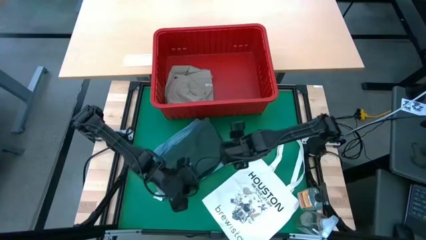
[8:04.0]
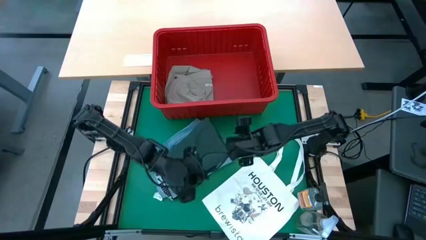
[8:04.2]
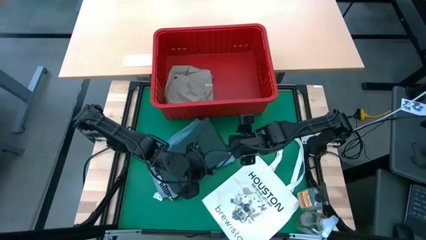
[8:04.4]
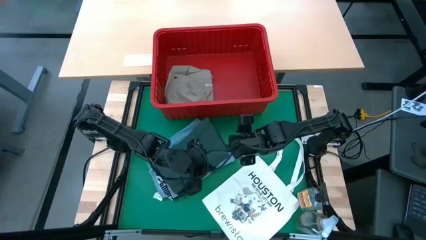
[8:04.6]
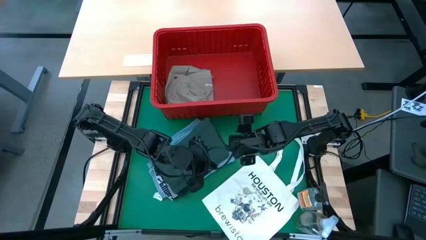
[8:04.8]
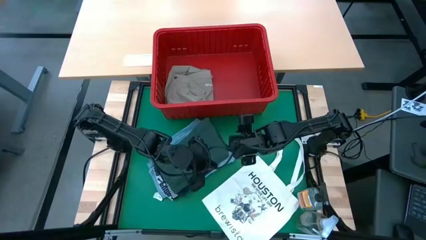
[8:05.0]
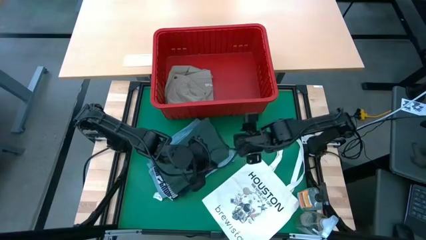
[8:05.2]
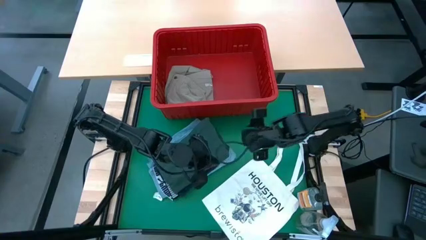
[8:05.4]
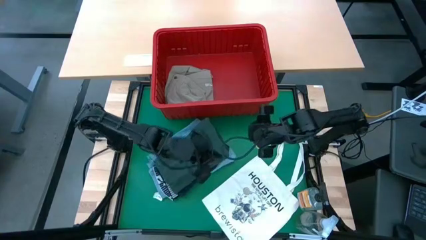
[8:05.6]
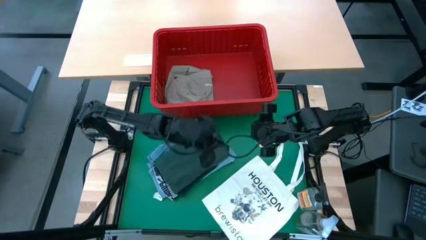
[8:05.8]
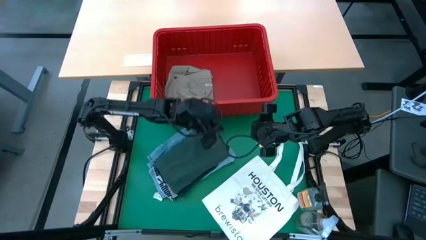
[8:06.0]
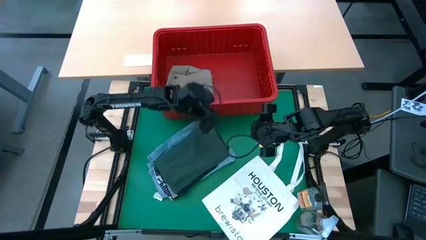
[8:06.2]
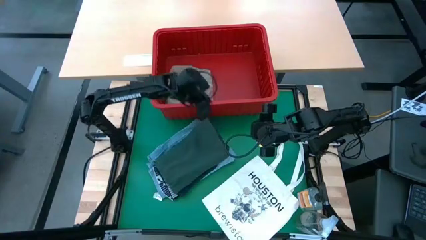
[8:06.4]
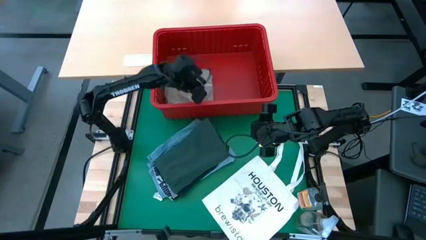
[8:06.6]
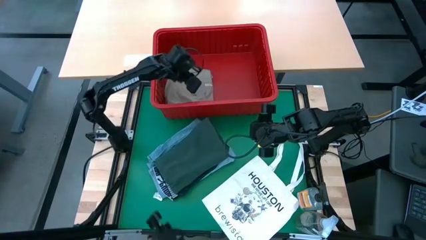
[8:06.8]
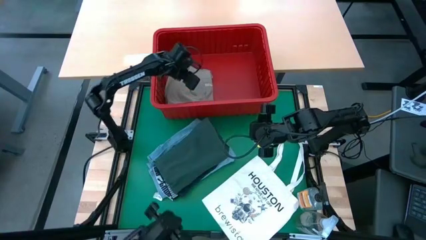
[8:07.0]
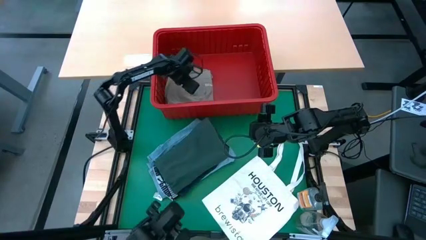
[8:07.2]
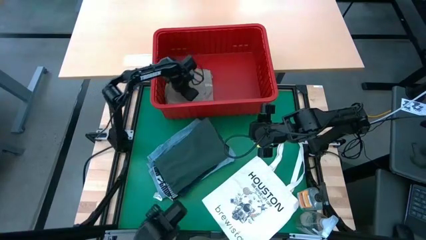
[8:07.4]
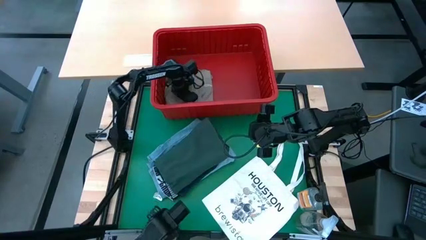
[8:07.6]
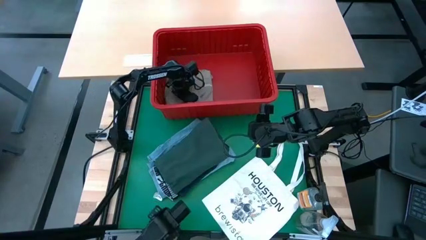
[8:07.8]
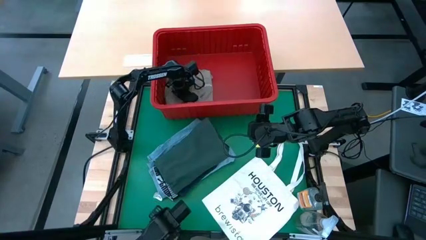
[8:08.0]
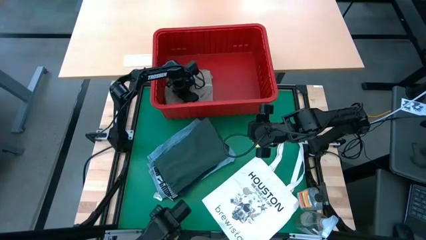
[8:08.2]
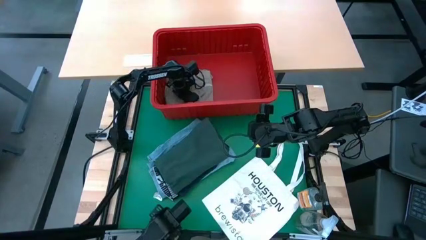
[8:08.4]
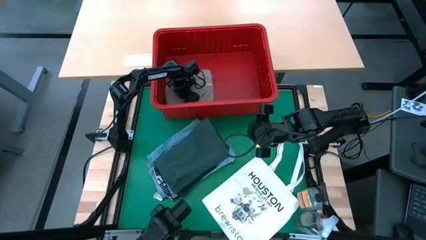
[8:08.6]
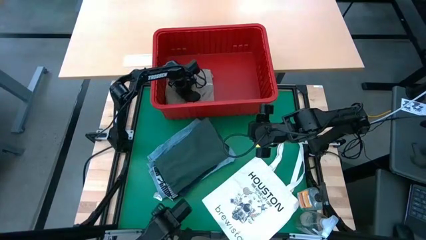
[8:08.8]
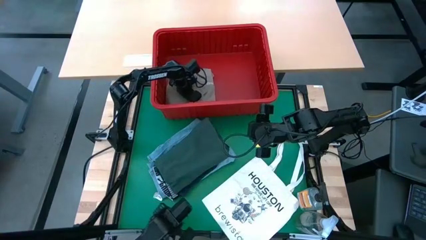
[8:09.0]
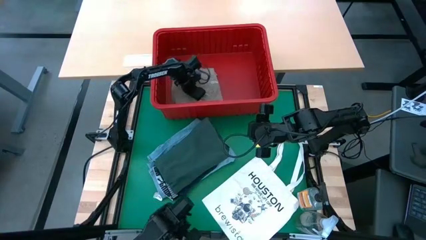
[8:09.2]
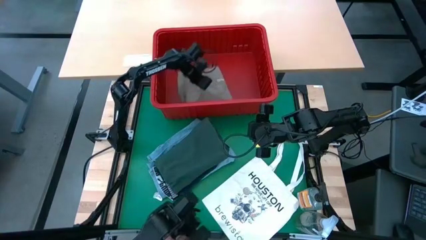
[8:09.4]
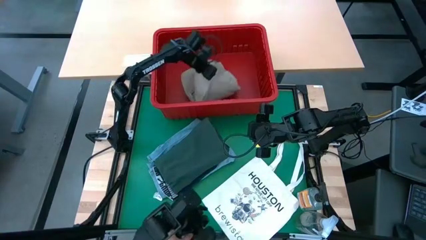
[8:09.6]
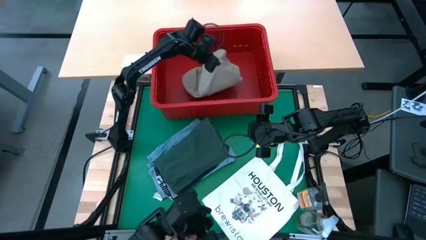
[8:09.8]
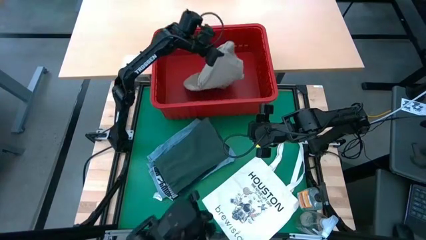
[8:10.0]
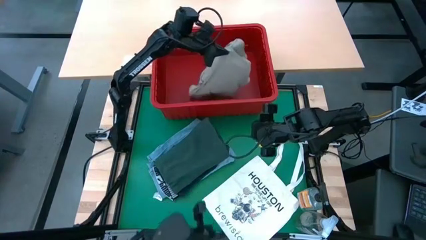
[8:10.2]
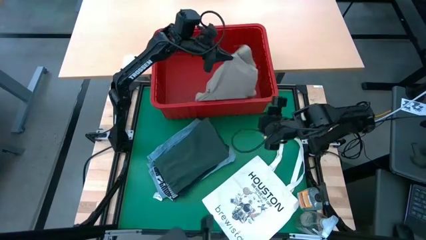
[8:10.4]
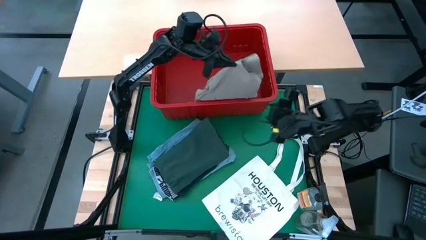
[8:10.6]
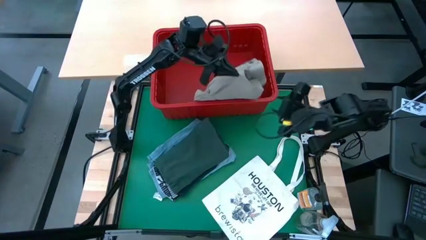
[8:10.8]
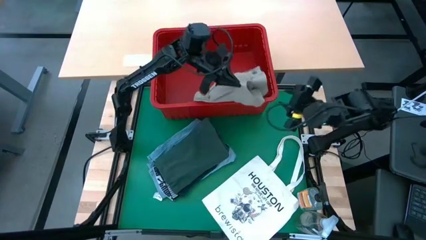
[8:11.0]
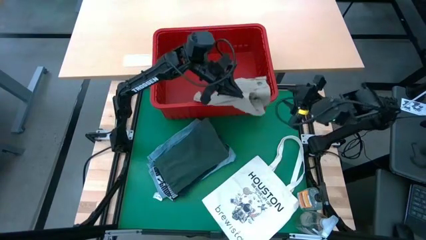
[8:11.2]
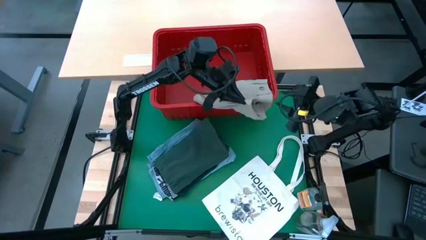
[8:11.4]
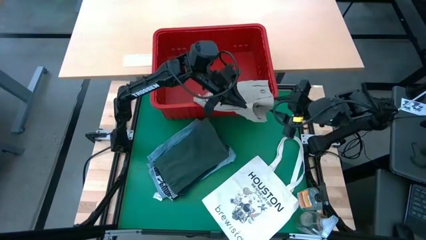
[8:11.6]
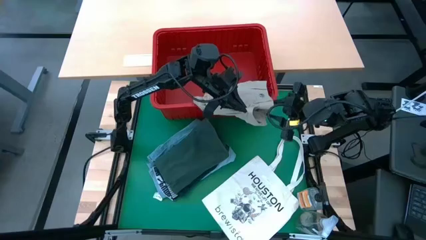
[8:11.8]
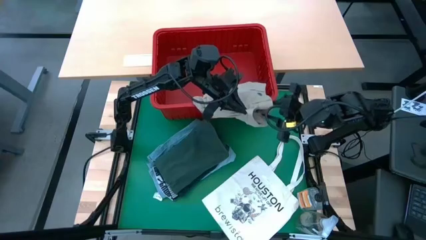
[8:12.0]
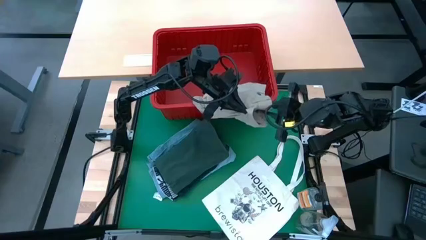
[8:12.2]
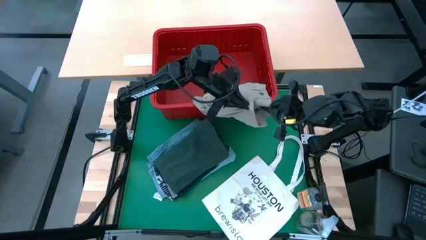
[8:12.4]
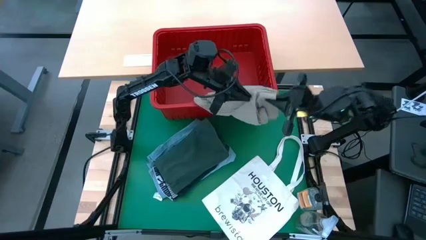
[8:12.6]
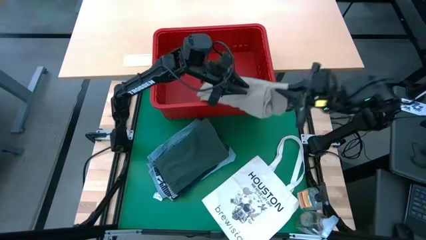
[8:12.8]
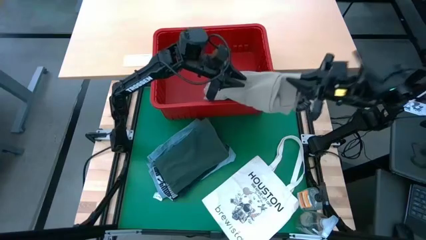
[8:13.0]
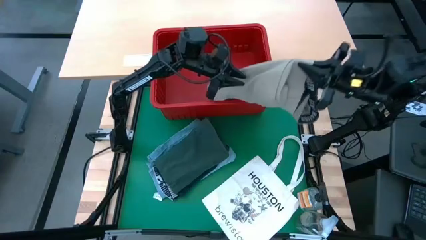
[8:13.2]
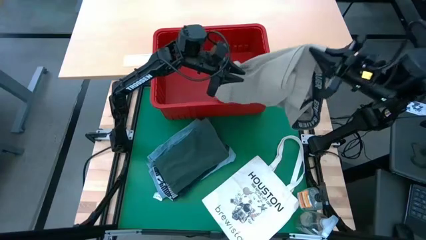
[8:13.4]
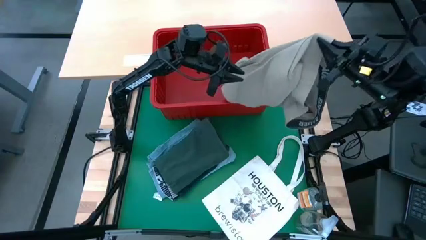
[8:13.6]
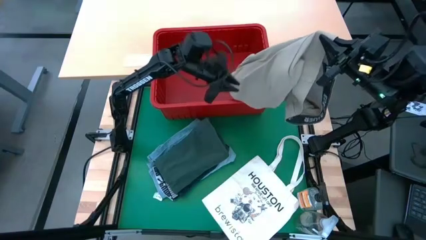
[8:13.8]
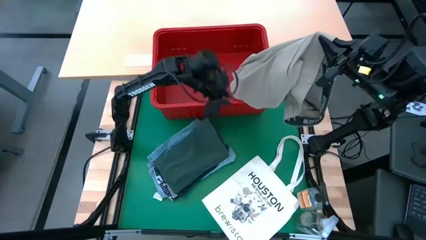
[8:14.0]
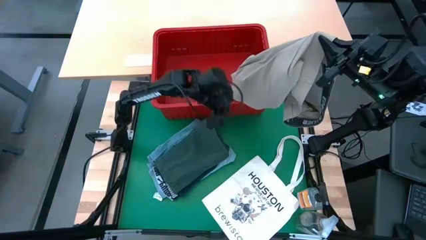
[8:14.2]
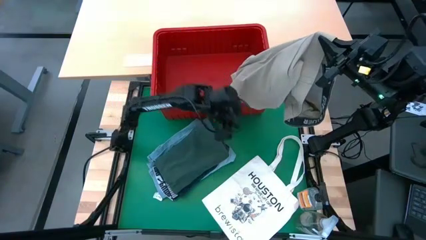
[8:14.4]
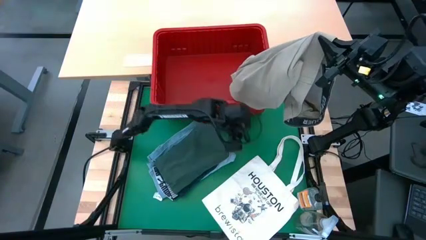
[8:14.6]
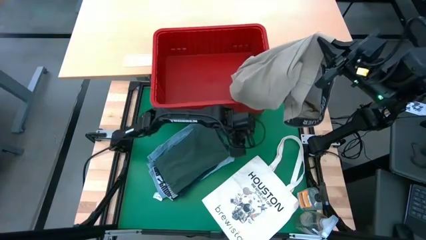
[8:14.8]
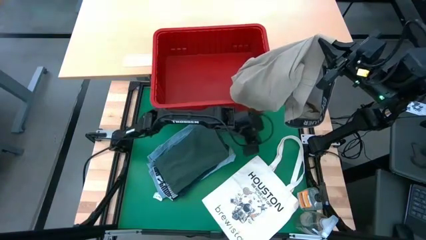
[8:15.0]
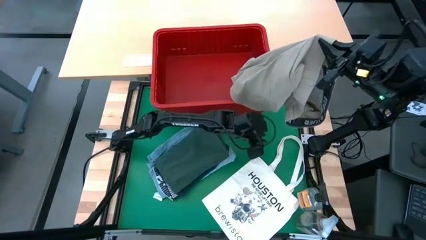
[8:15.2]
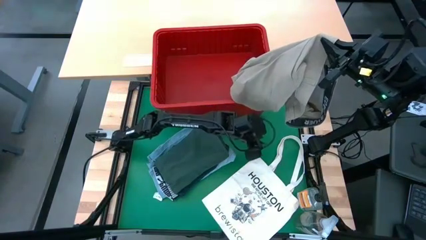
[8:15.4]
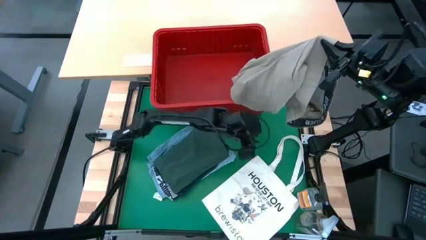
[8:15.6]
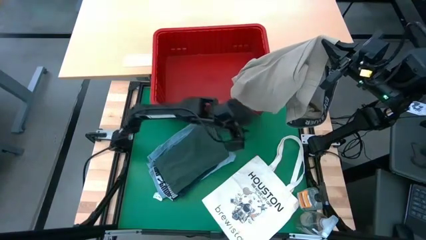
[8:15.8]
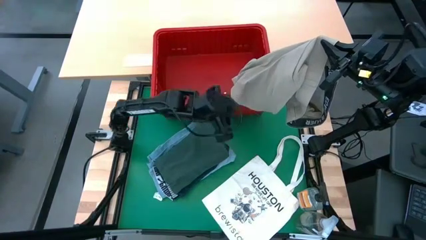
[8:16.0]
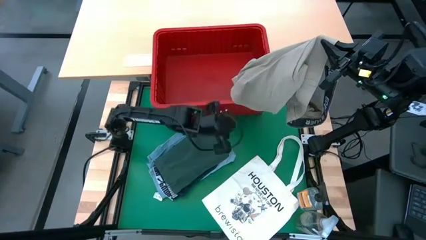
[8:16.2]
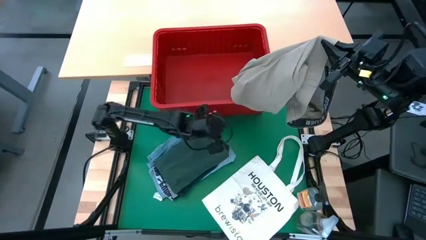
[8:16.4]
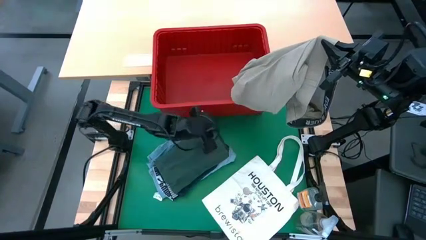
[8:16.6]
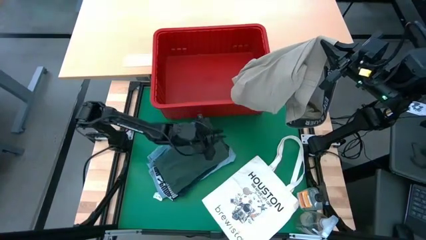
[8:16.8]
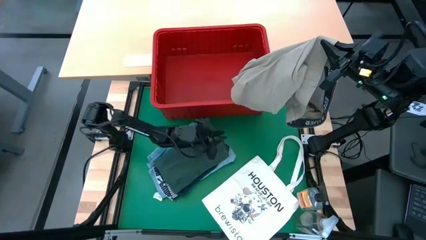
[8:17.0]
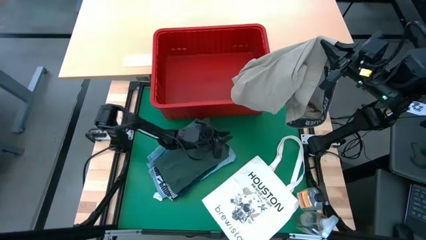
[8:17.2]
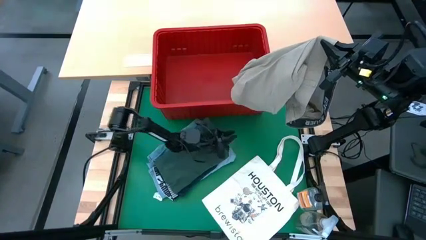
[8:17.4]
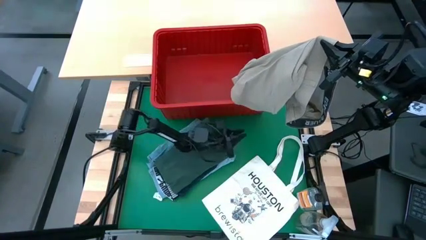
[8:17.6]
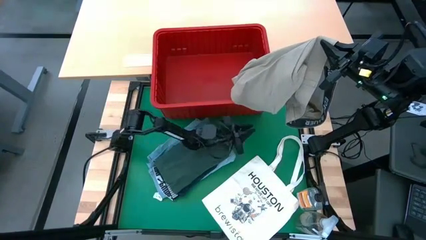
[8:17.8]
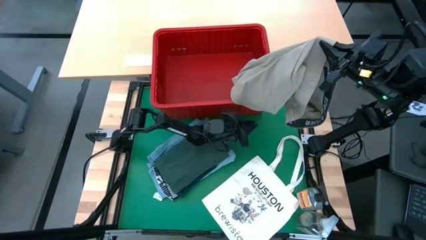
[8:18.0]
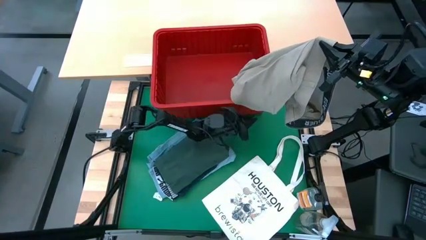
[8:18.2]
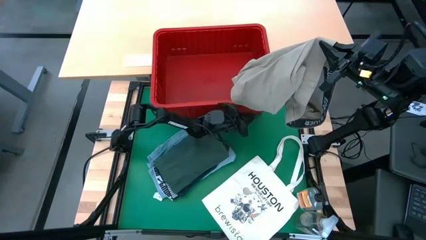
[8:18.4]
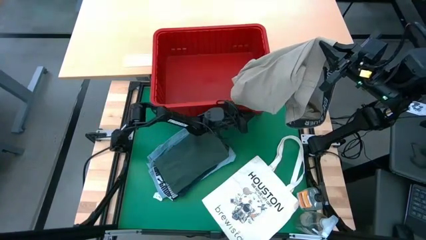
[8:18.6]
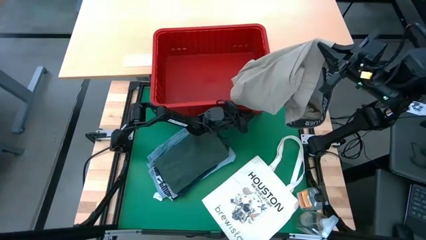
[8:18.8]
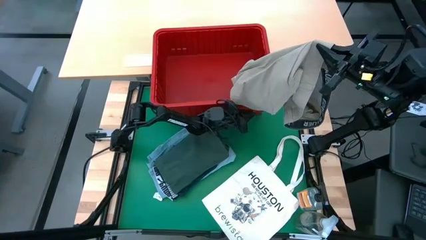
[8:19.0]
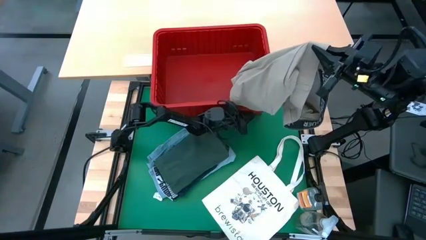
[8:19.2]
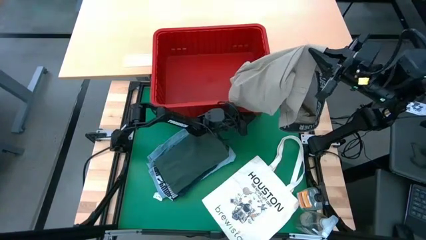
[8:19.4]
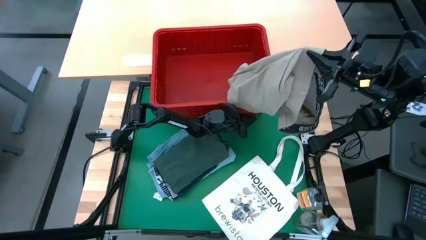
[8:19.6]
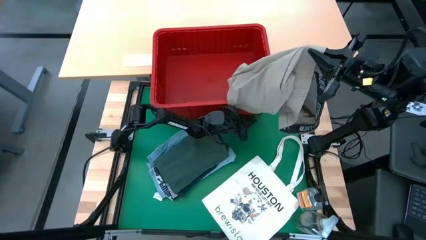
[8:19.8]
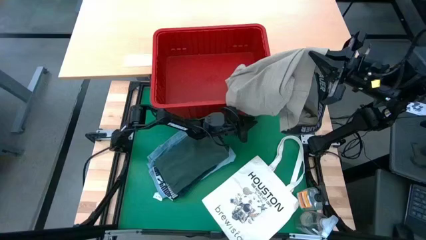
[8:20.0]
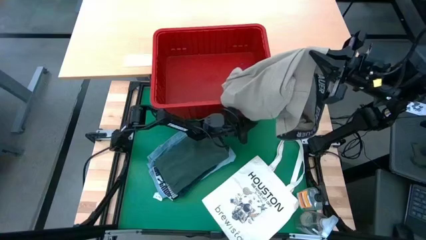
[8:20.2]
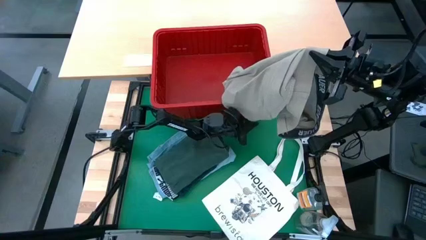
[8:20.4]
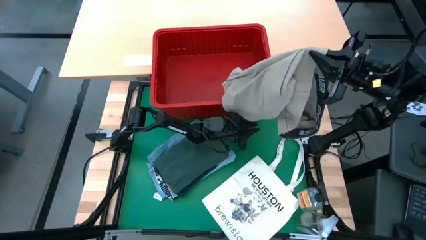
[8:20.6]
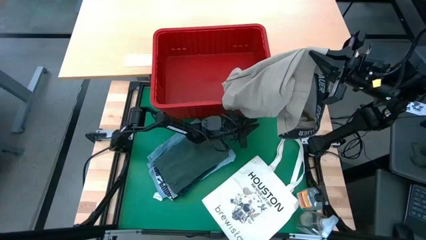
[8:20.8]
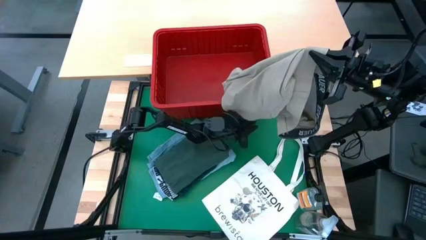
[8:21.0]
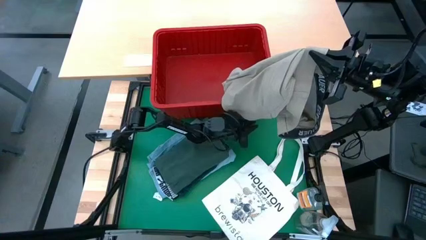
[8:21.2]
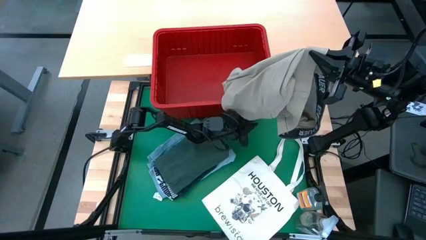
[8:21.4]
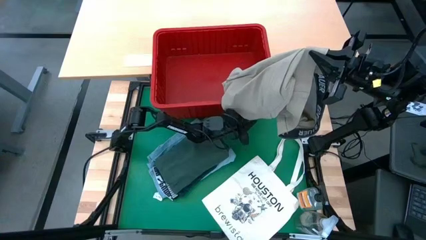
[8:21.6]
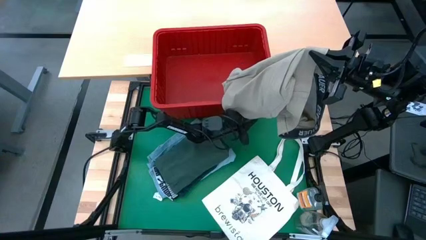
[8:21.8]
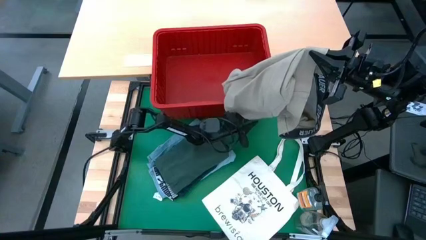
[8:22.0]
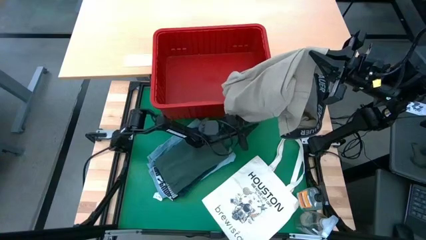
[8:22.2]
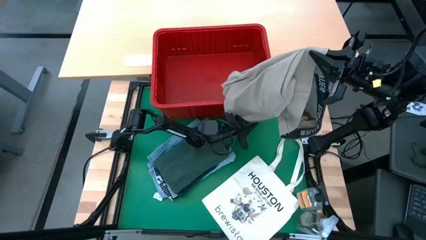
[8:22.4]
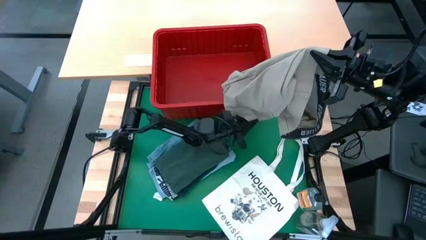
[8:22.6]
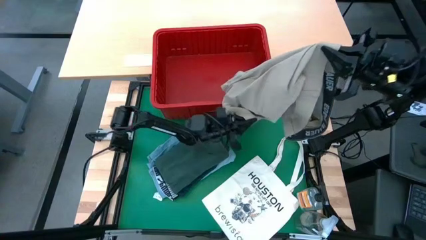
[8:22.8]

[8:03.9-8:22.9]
Task: Fold Laundry from Bin
Fold the light brown shorts
